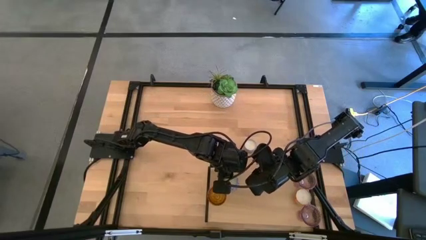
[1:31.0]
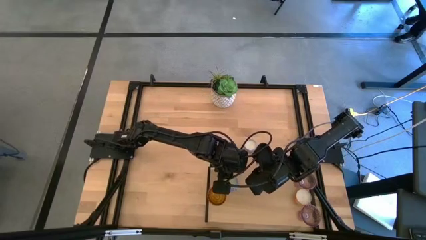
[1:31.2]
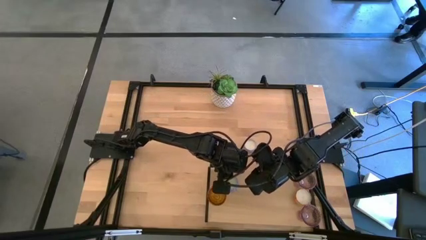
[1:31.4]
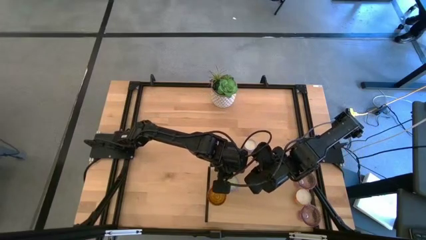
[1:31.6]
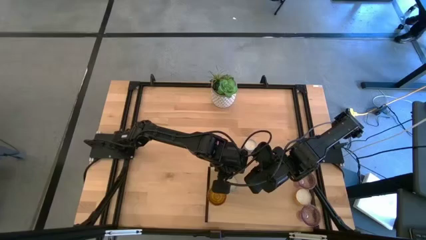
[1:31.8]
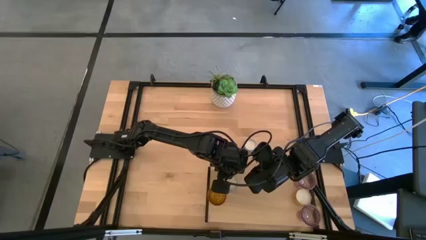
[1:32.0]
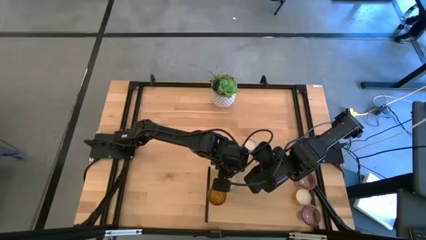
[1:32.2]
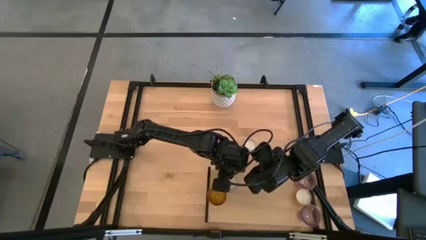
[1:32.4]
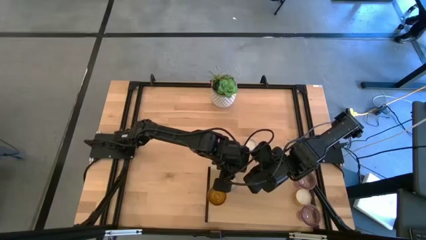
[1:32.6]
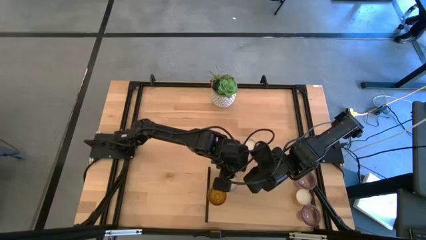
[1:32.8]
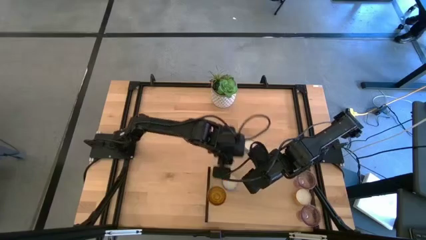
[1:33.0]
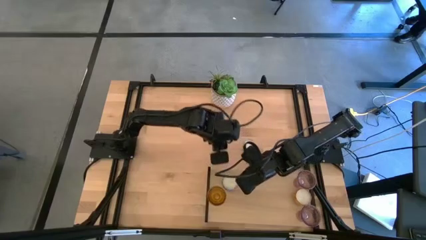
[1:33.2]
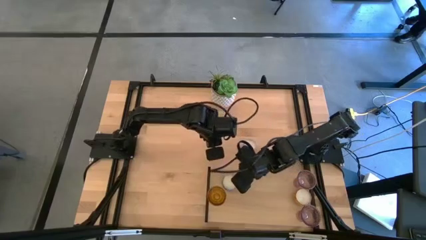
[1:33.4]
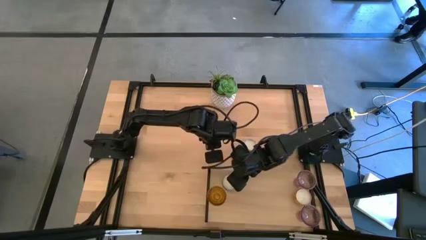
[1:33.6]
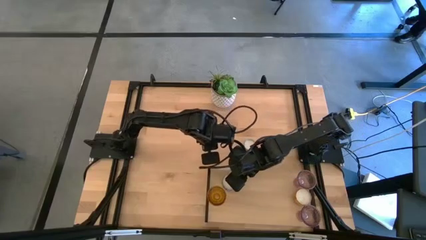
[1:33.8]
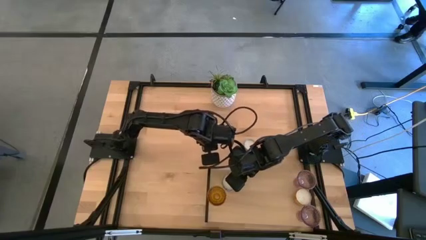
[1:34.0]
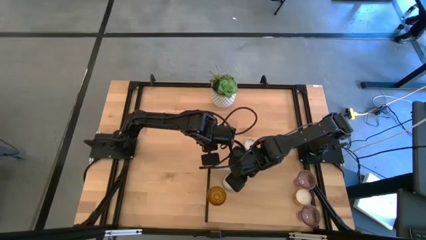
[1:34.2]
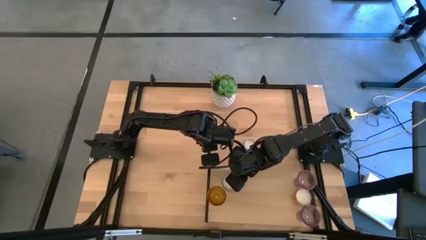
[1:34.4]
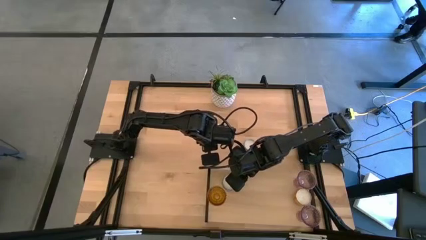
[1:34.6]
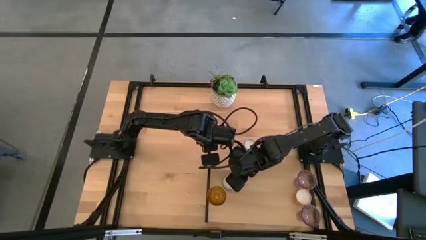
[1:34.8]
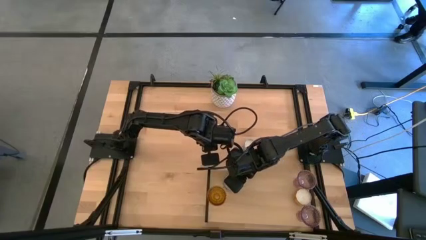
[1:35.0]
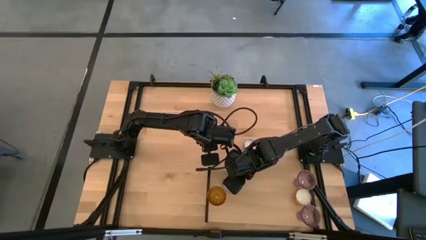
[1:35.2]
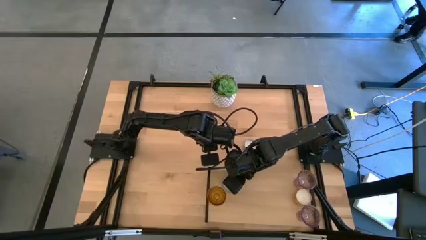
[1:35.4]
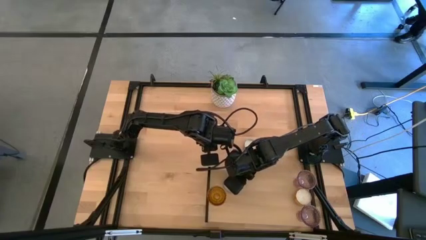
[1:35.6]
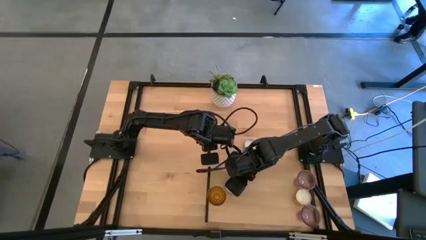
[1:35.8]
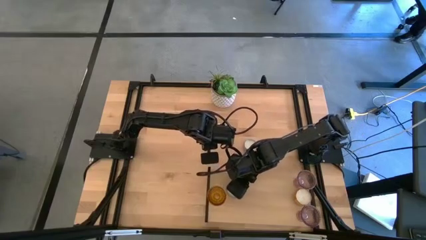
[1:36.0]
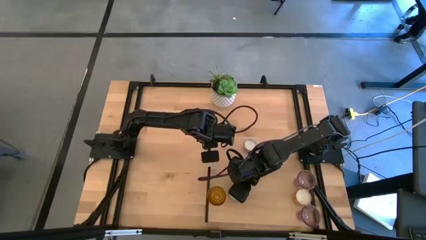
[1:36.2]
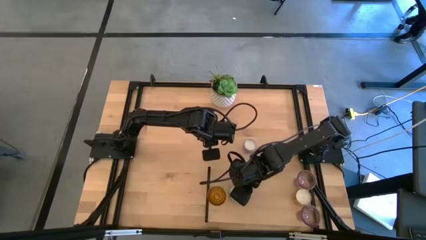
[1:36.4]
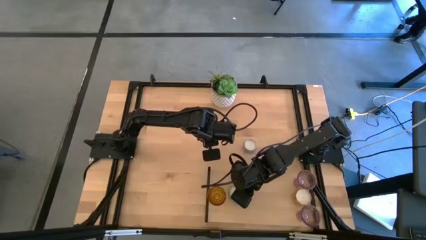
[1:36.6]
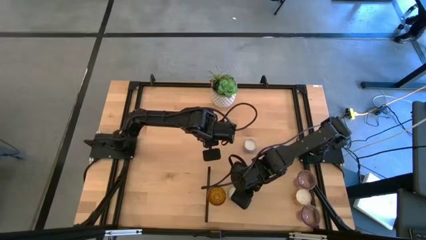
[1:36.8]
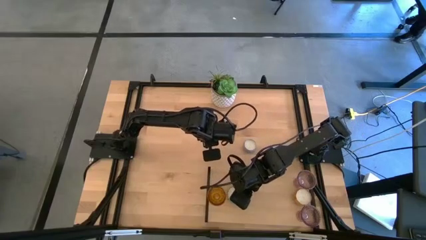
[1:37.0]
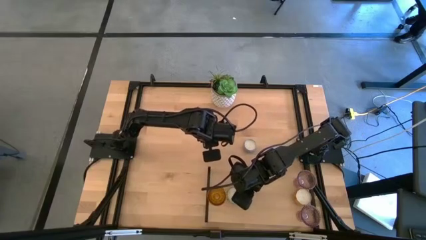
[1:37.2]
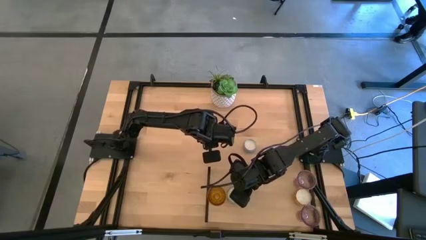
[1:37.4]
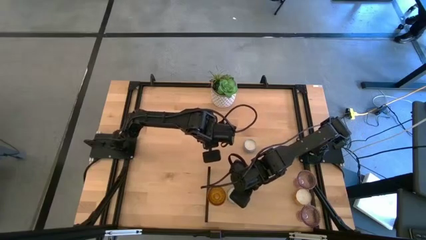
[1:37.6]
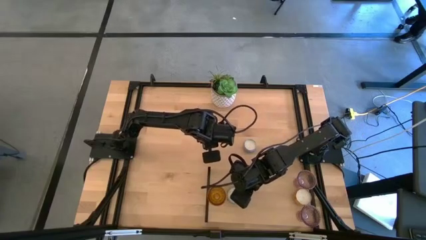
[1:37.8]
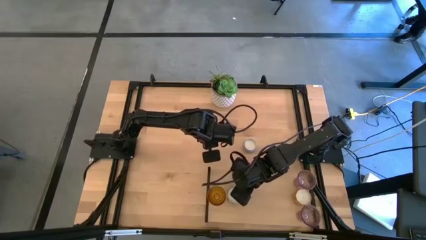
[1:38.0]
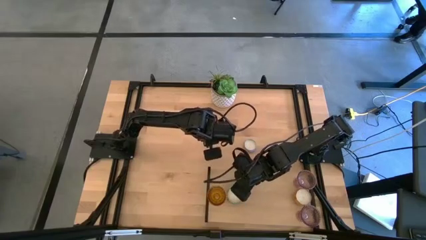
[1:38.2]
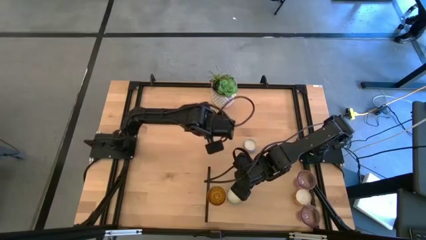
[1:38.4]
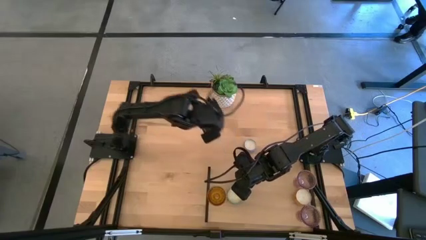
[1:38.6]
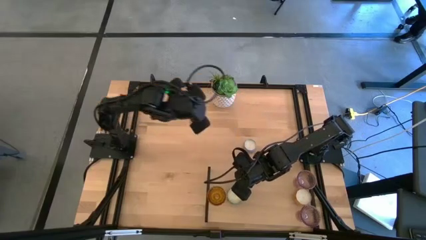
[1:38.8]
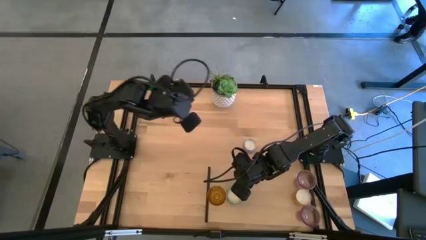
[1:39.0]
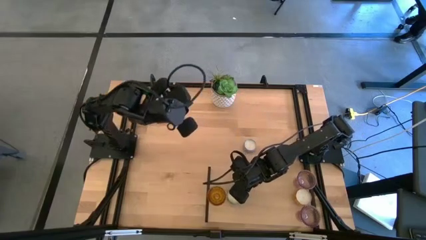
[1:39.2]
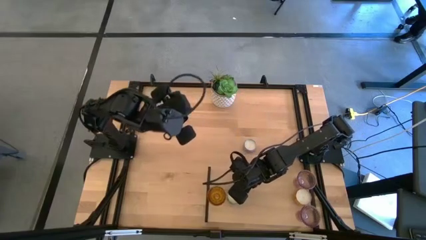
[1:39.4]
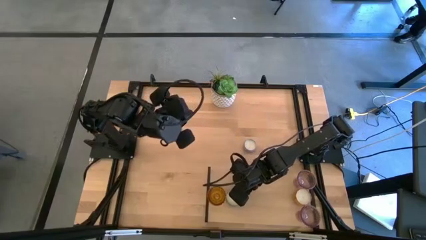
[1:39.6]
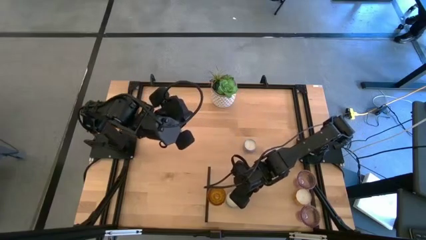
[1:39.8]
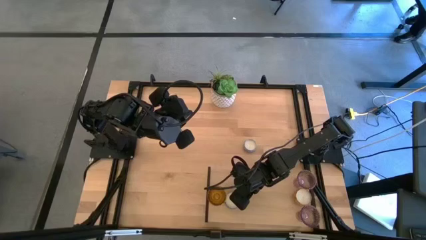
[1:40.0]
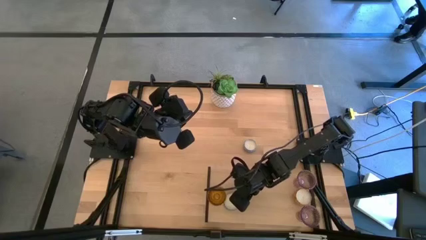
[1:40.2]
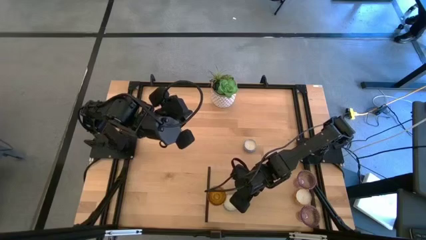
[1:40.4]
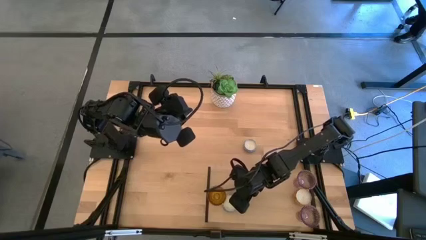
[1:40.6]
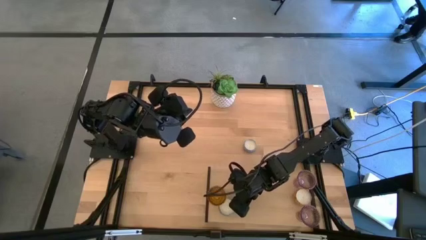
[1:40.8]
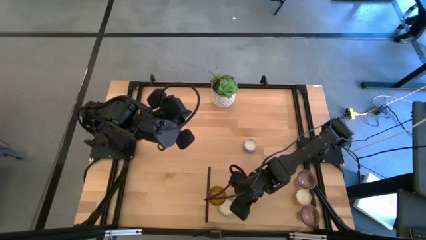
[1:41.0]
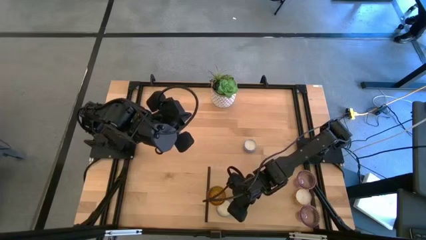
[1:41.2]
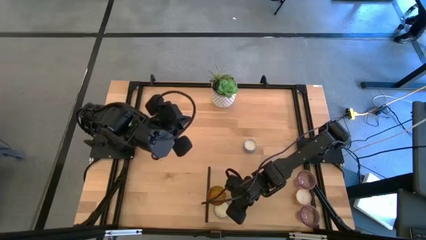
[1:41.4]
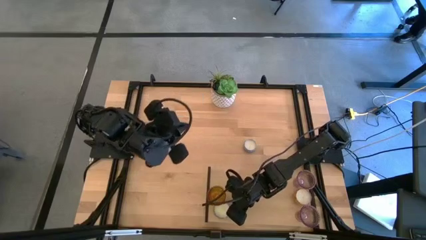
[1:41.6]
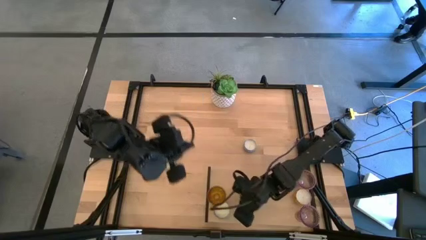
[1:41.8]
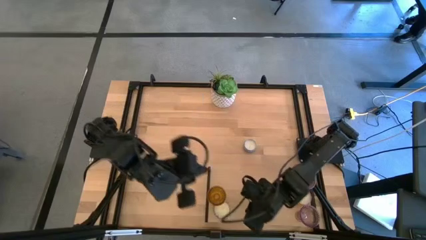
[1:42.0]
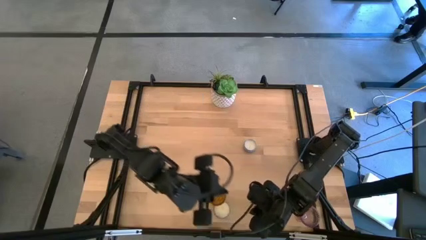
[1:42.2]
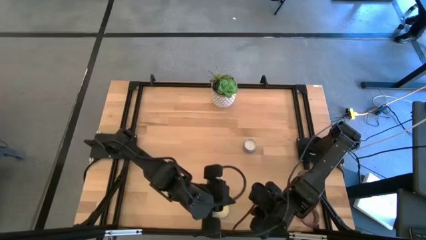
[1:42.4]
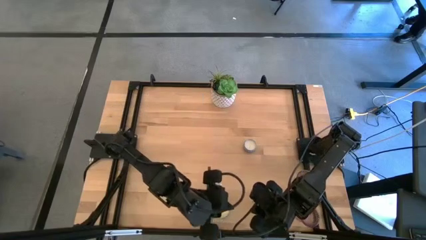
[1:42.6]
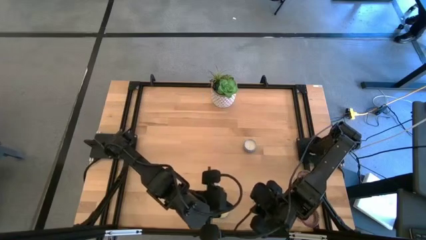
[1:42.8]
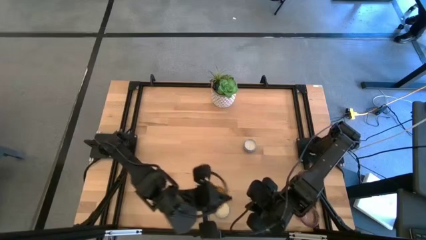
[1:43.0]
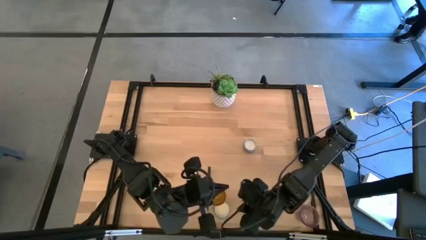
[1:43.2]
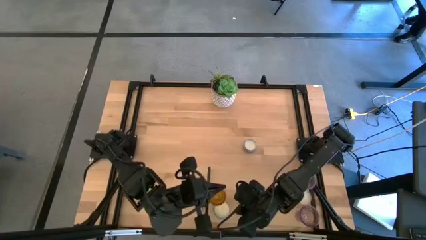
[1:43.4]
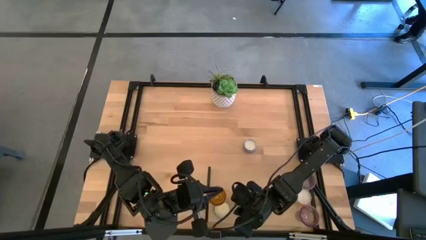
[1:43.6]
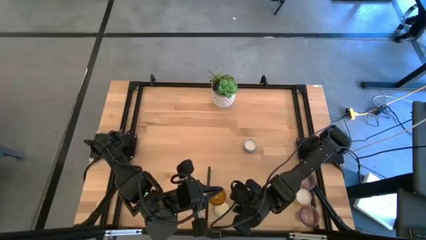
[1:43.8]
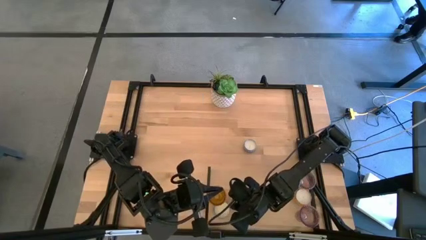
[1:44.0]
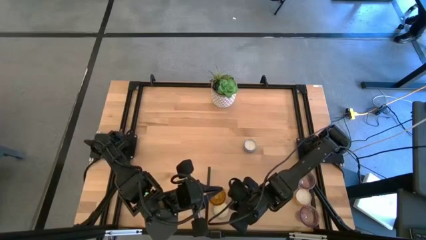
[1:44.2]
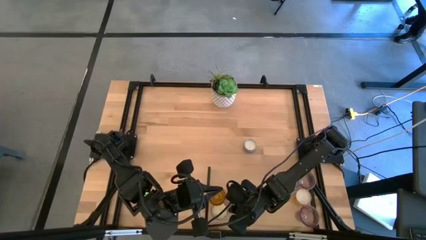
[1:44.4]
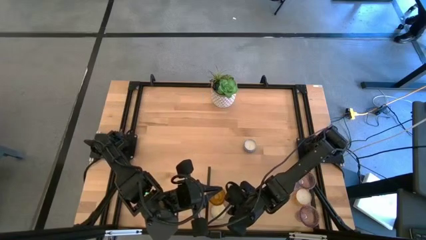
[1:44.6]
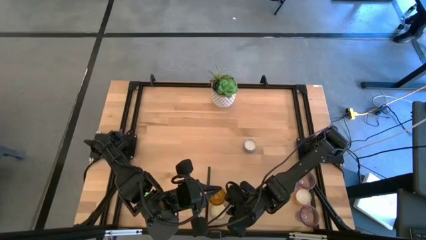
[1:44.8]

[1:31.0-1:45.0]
Task: Pick & Place candle stick holders
Put the dark blue scented candle on the shelf aligned with the yellow glass candle holder

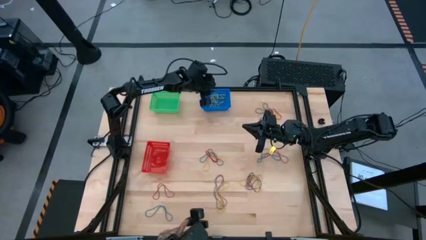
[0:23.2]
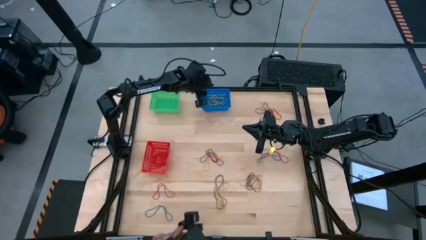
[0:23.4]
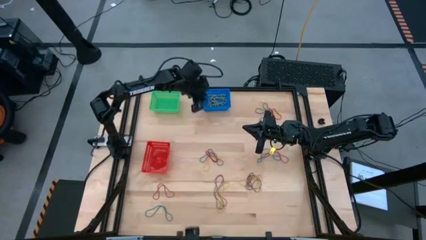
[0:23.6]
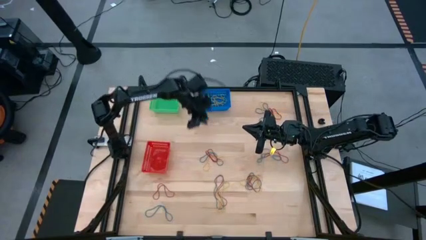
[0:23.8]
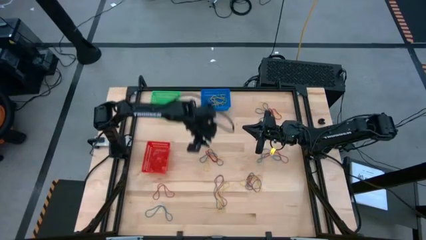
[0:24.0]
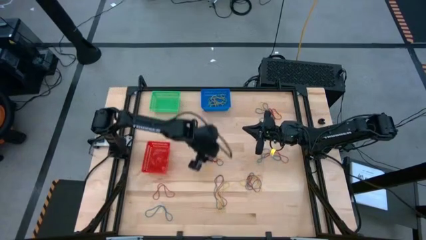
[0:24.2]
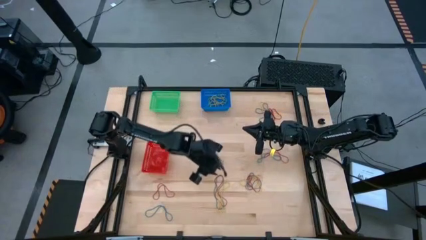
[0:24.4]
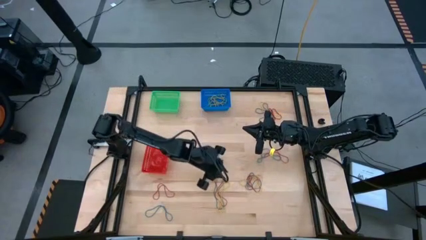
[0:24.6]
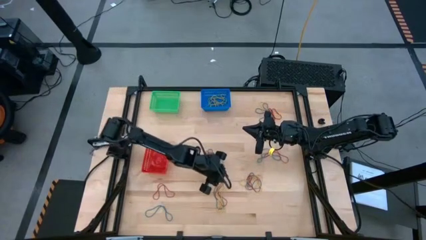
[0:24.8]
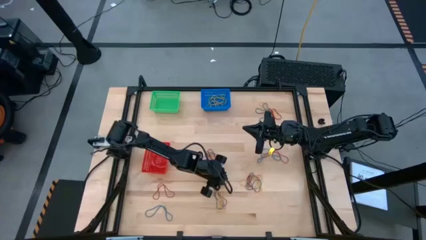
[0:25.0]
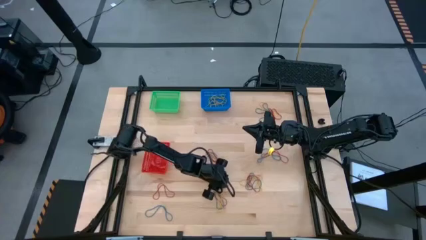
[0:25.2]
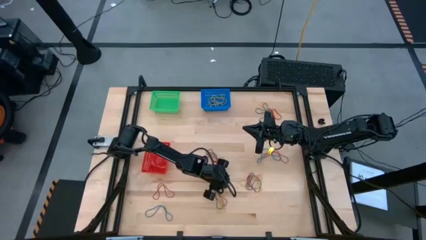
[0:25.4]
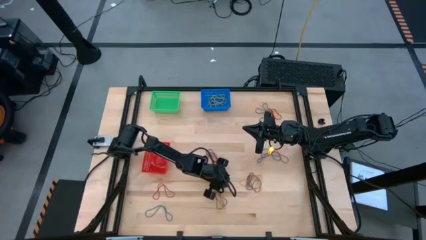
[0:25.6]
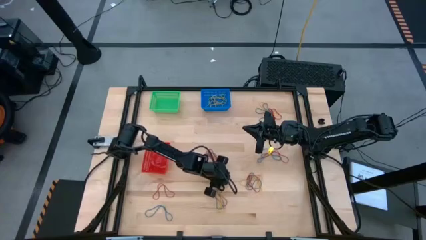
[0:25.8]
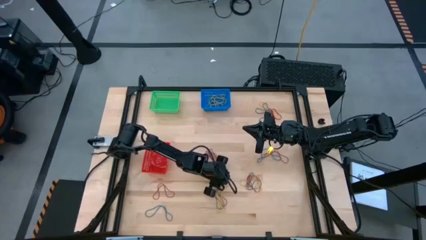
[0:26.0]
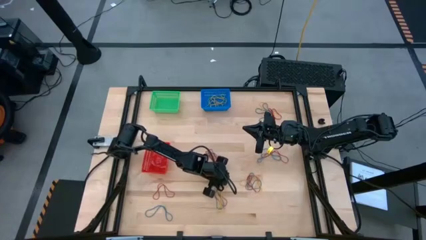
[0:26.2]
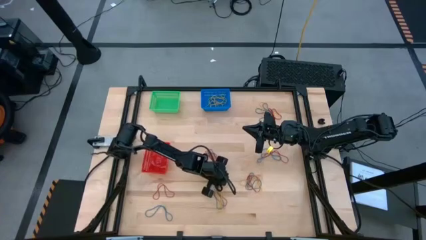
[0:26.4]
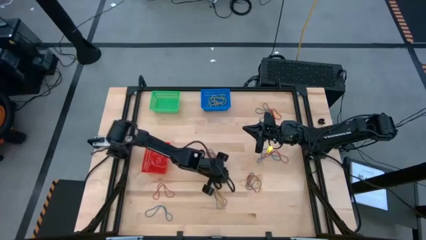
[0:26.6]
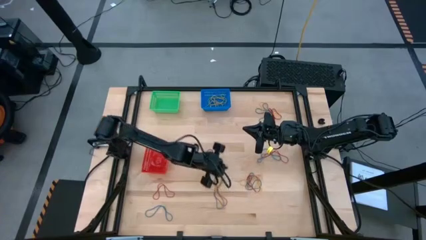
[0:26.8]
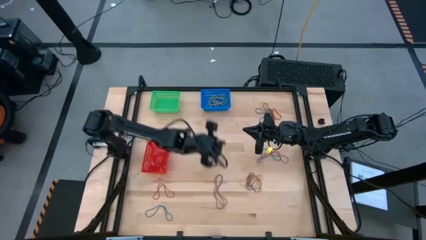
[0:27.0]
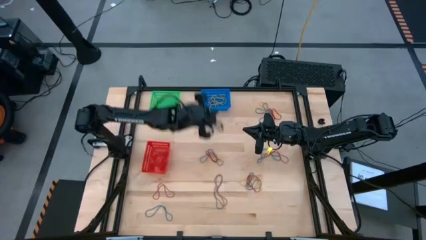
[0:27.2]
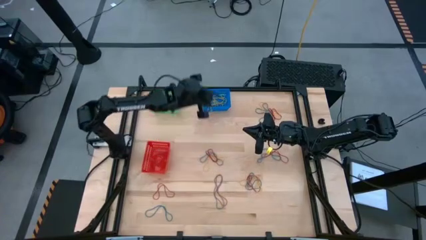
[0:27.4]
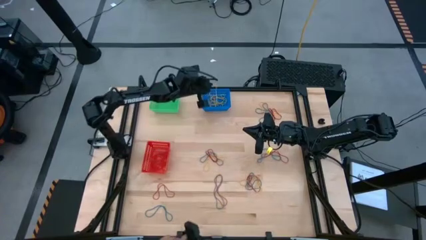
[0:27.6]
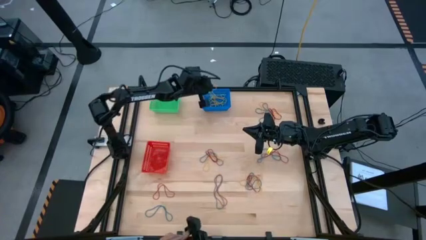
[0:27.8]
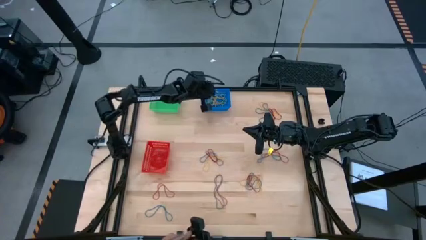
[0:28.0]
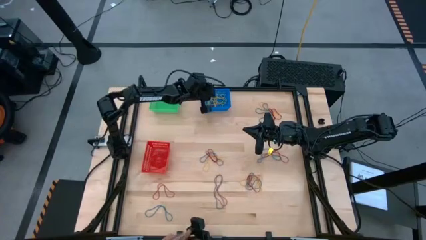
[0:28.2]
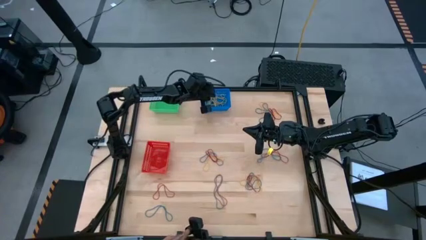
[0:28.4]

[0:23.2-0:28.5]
Task: Sort rubber bands into baskets
Put the yellow rubber band into the blue bin
